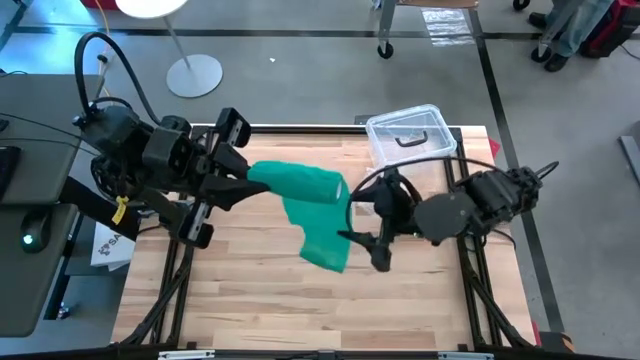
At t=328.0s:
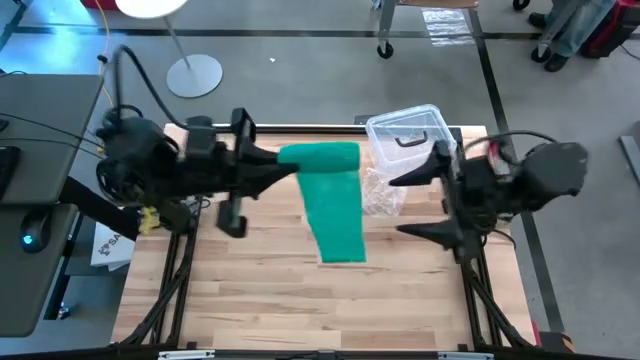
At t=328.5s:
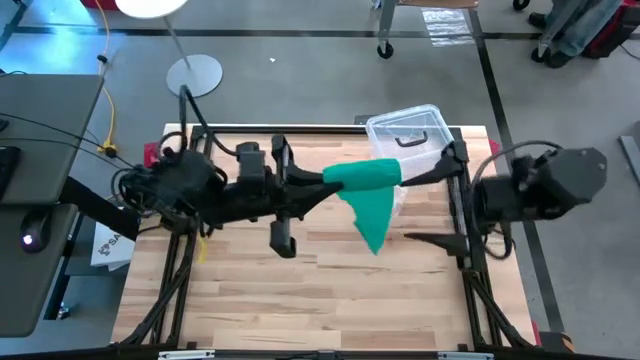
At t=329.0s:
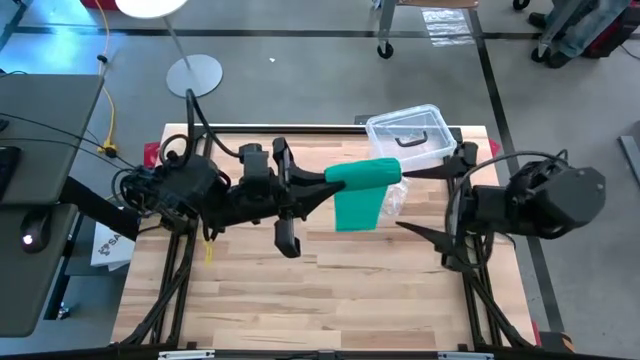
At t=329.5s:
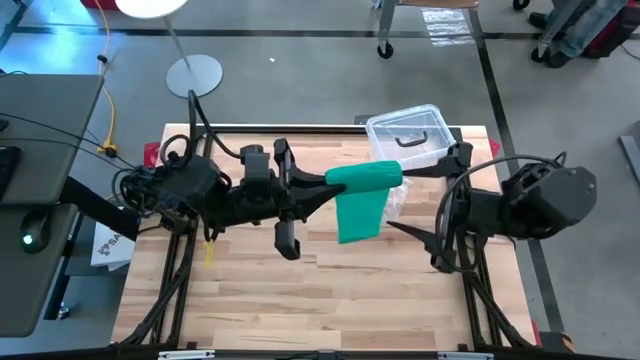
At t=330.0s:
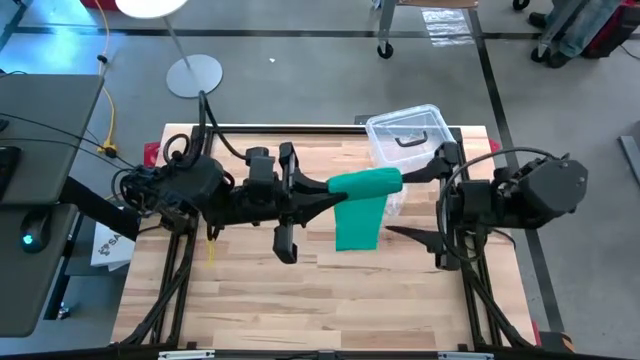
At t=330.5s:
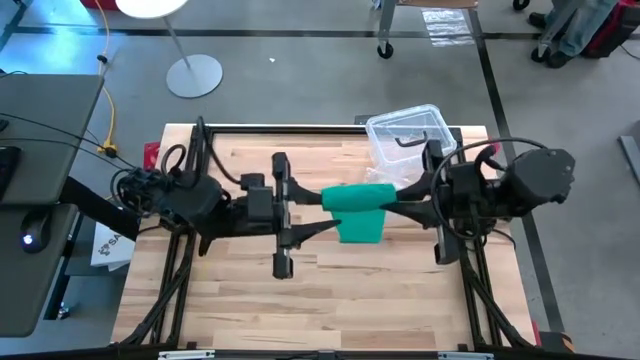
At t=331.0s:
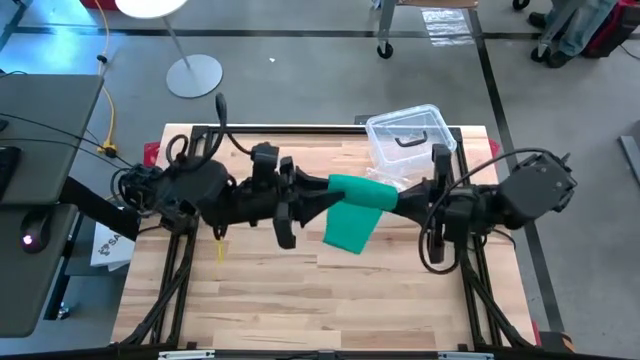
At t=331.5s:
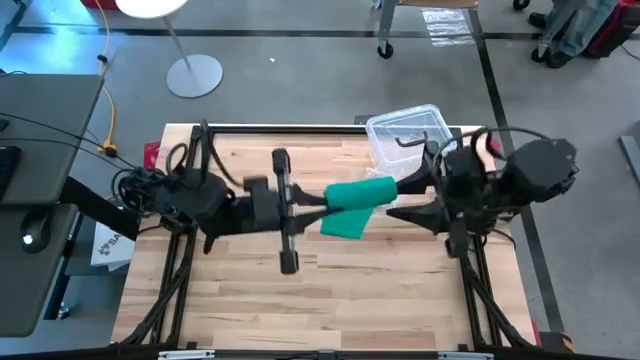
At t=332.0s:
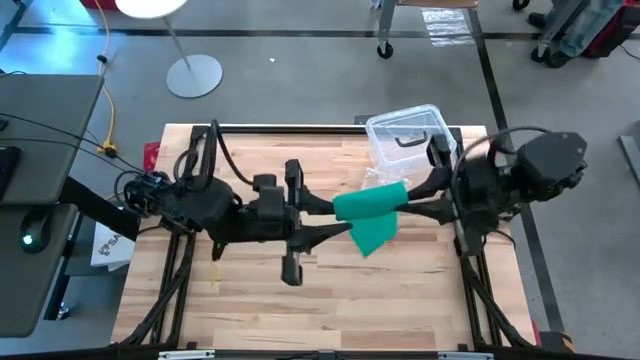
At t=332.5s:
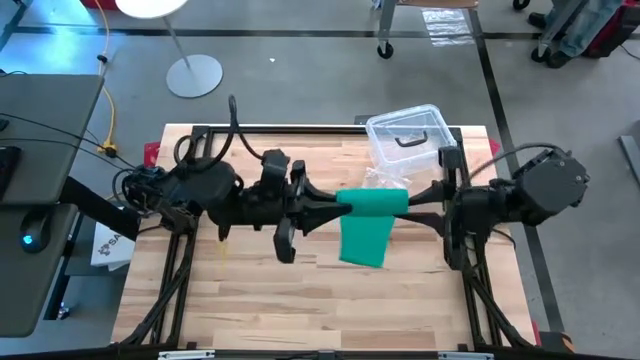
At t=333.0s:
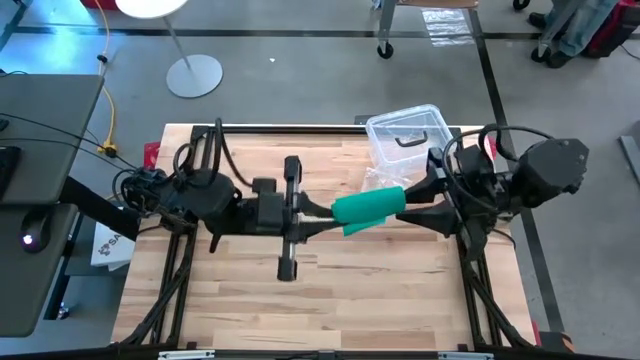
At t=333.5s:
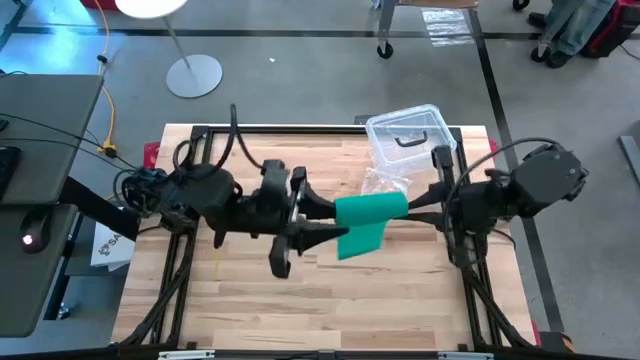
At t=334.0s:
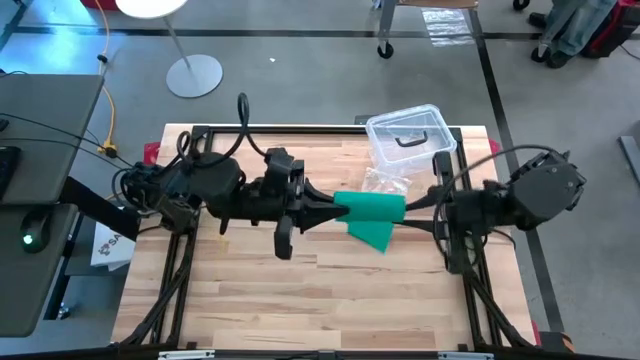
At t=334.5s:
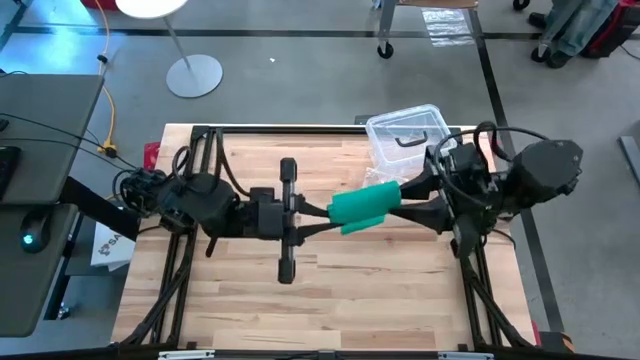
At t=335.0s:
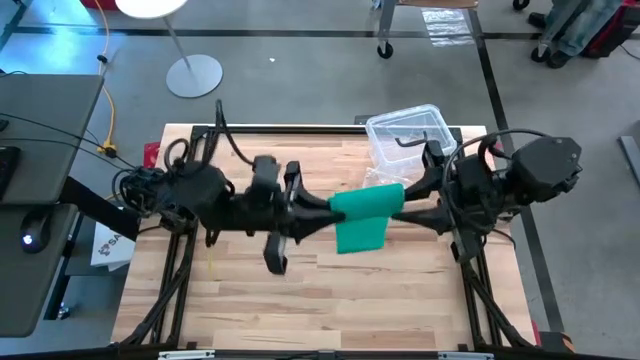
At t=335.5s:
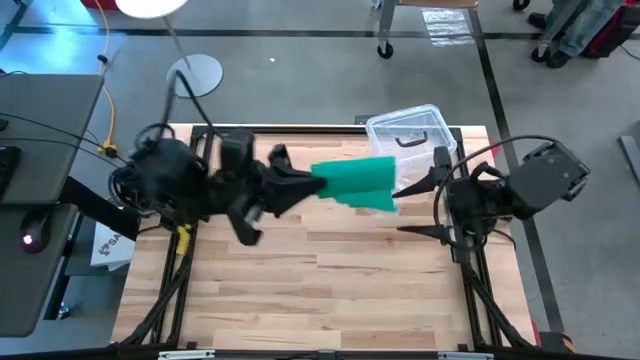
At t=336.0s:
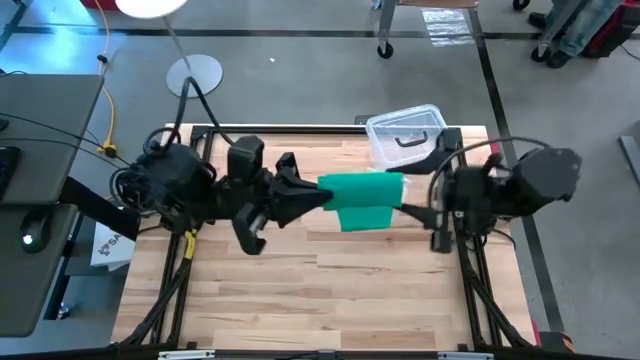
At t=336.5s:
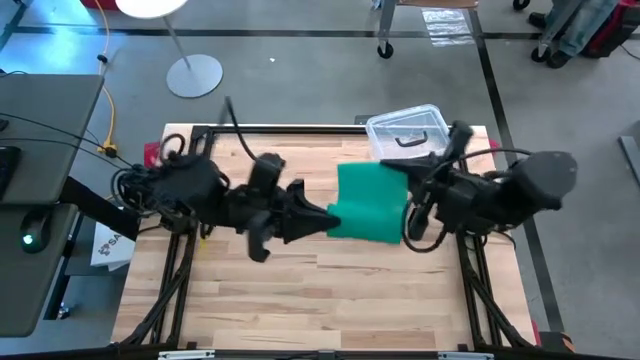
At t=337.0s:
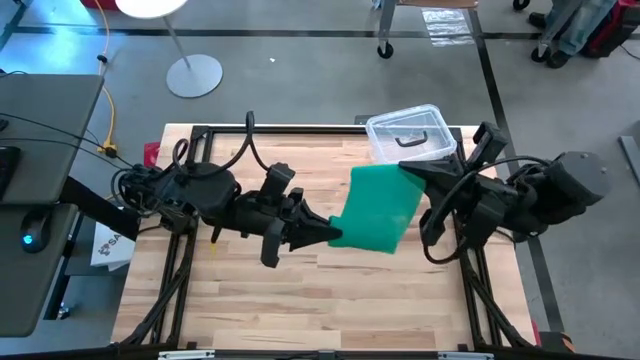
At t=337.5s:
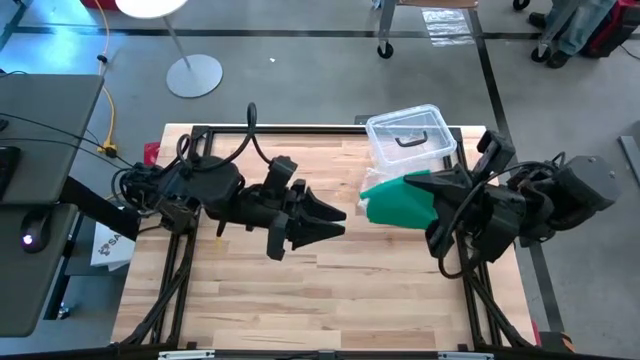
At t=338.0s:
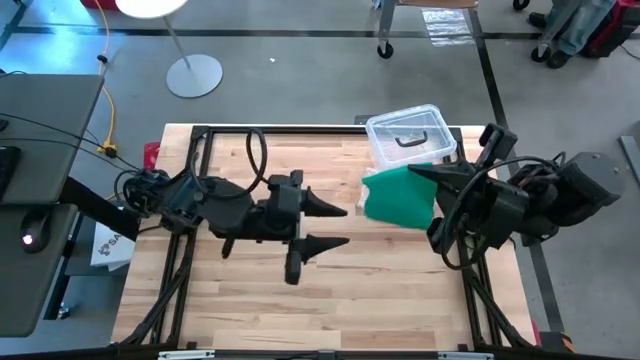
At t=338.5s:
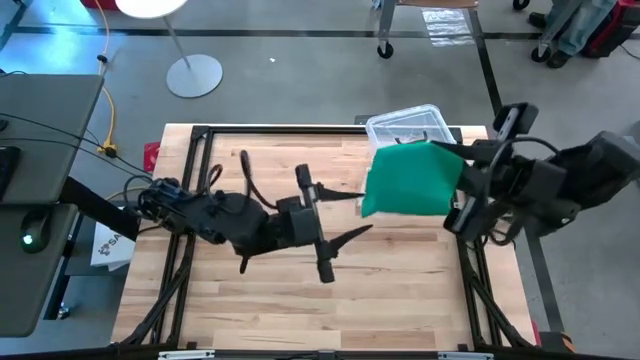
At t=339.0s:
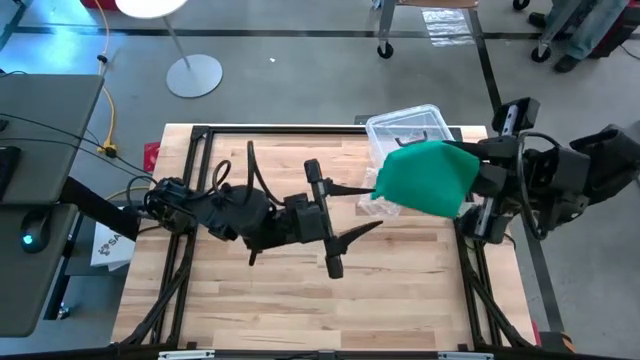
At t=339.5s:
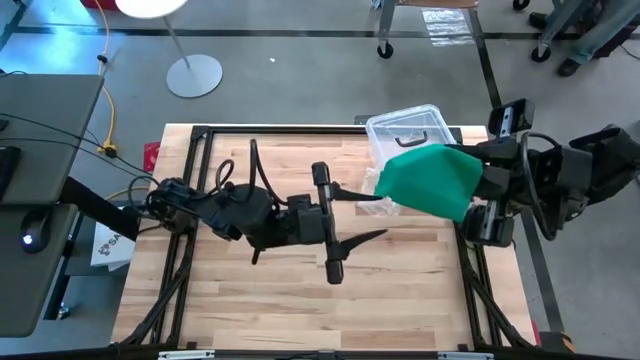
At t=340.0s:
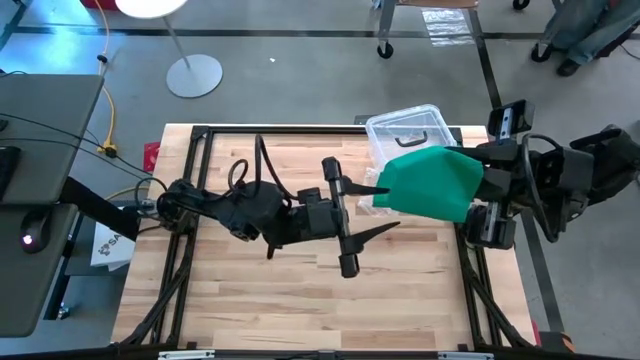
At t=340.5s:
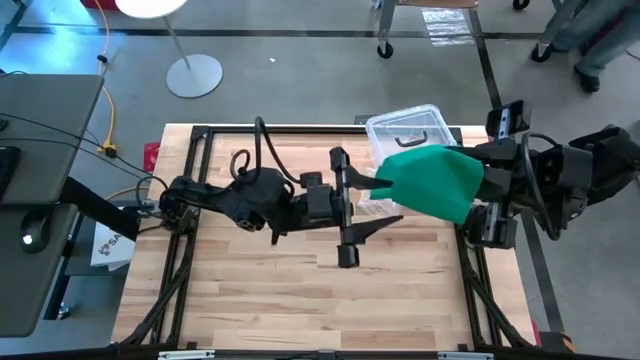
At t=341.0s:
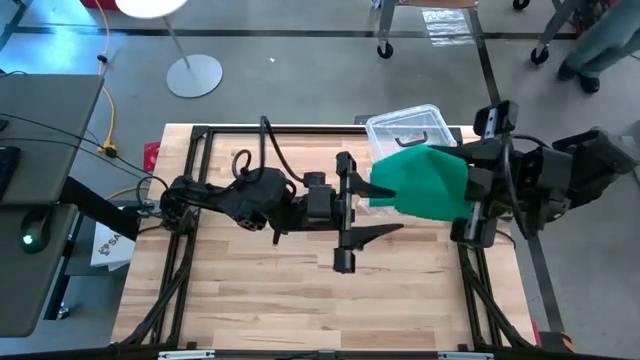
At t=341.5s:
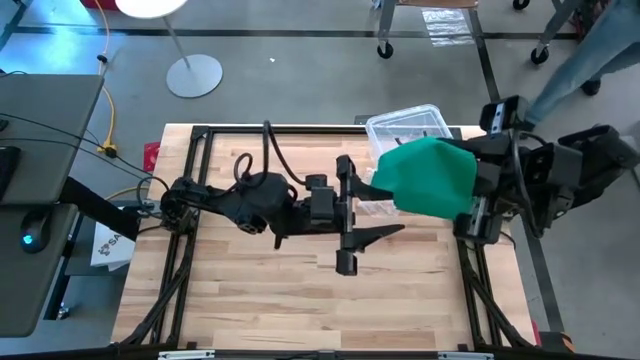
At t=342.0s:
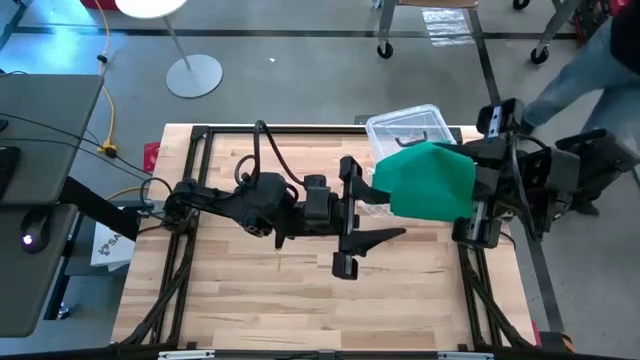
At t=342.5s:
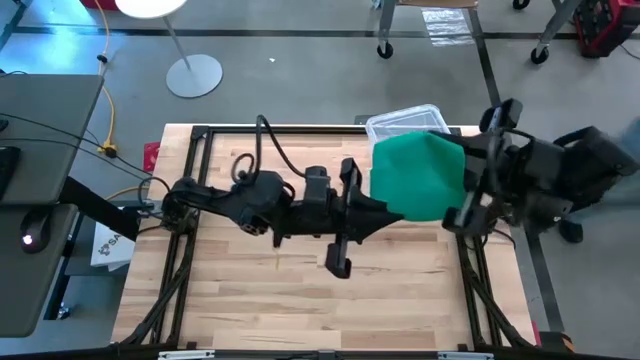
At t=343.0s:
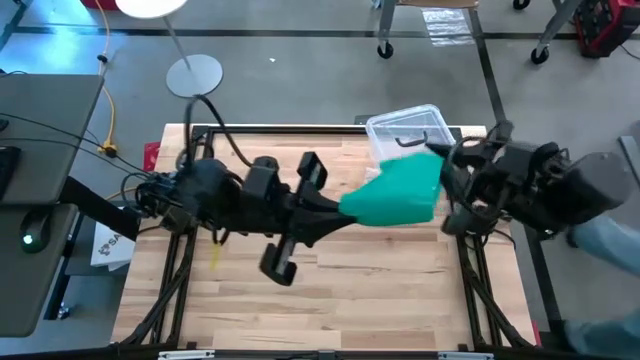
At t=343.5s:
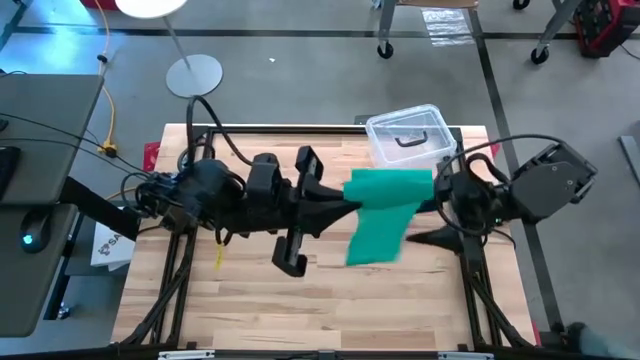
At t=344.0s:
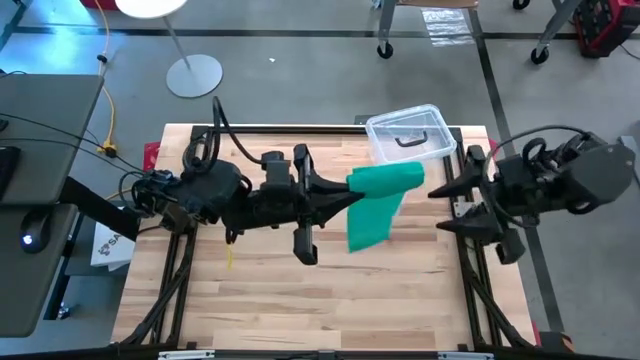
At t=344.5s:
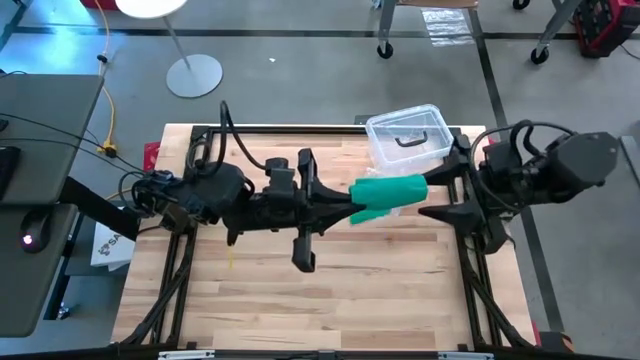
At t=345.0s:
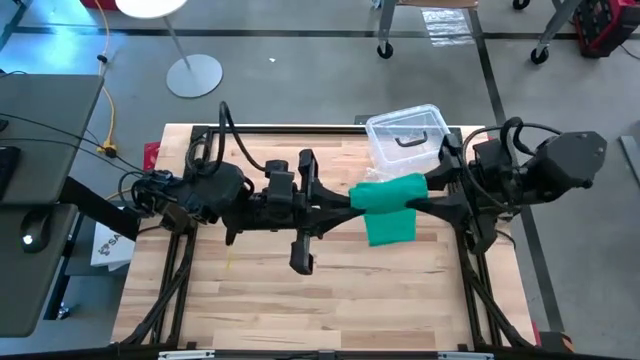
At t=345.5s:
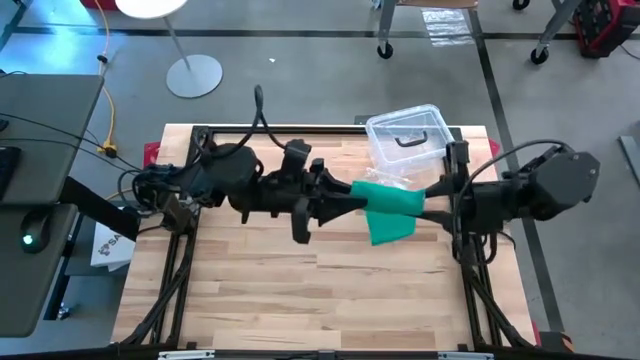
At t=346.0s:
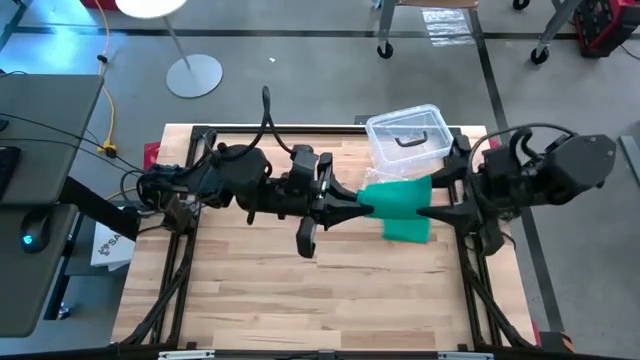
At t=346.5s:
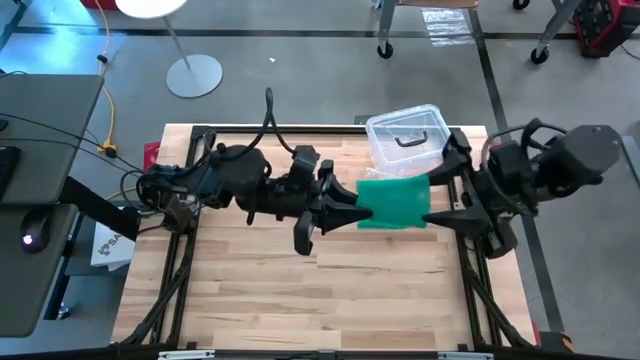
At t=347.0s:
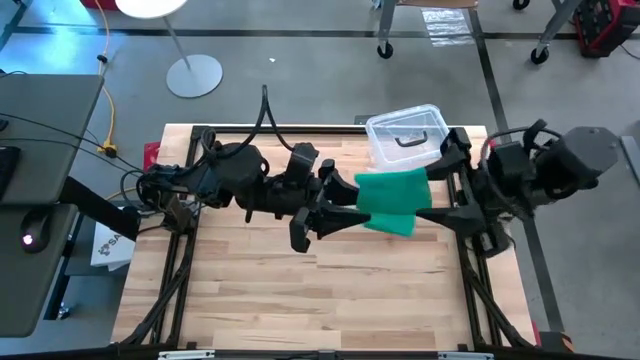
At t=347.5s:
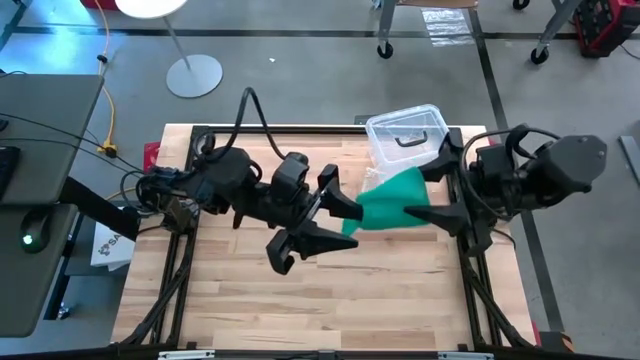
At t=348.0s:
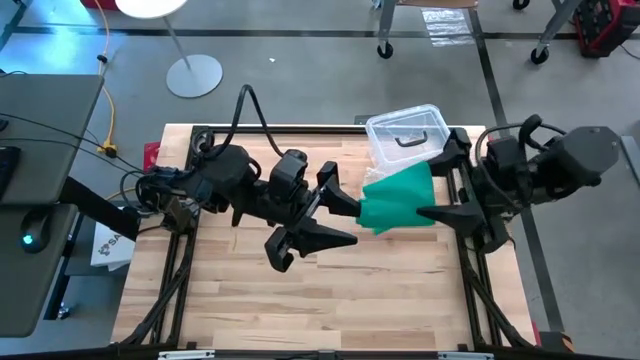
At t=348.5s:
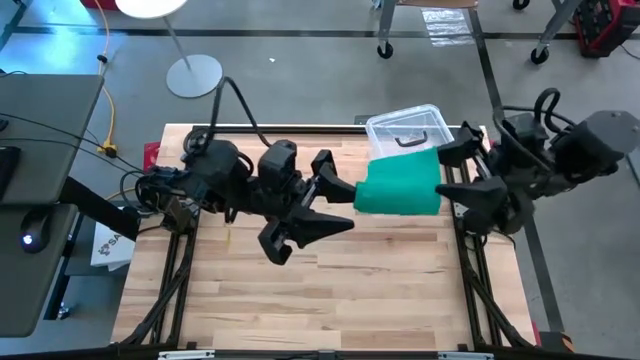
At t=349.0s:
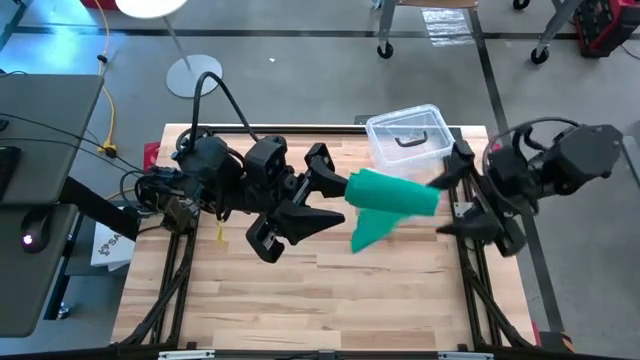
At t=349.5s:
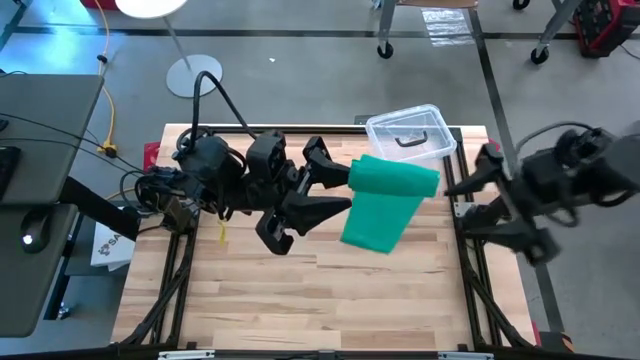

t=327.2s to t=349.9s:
Task: Roll bandage
Roll the green bandage
